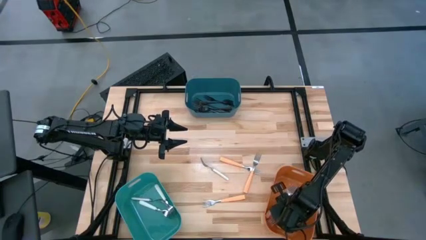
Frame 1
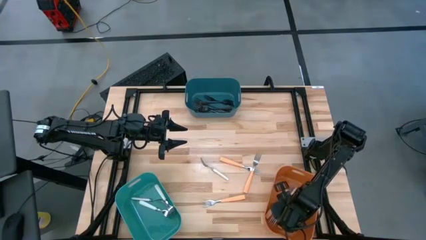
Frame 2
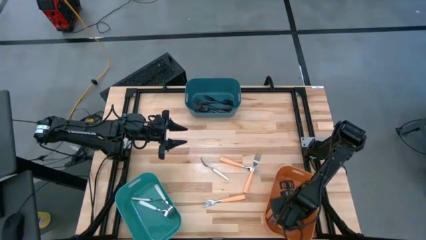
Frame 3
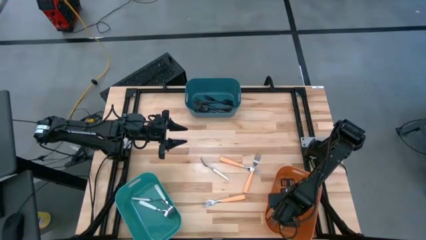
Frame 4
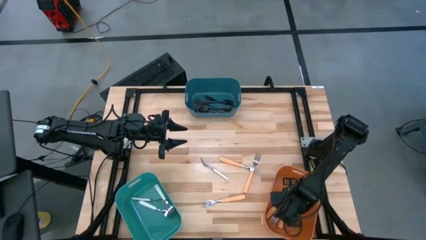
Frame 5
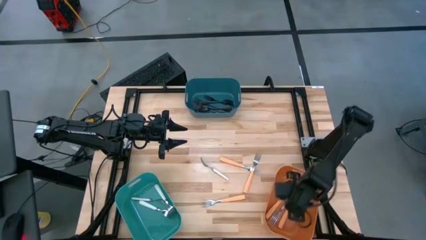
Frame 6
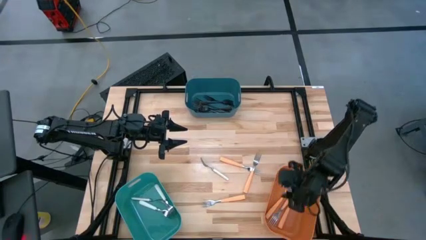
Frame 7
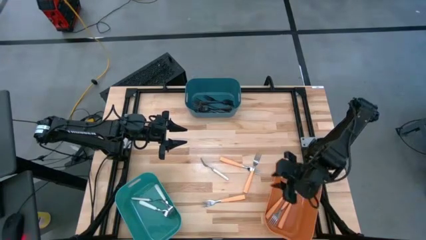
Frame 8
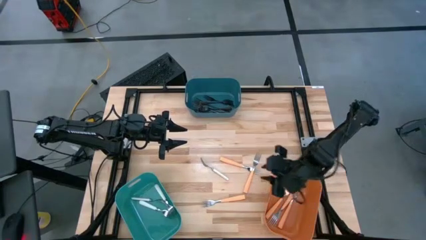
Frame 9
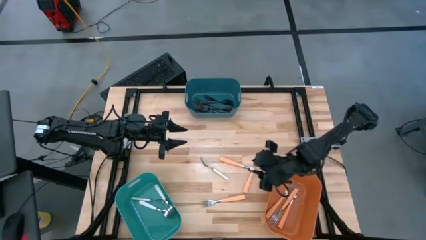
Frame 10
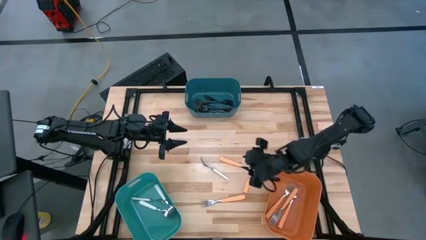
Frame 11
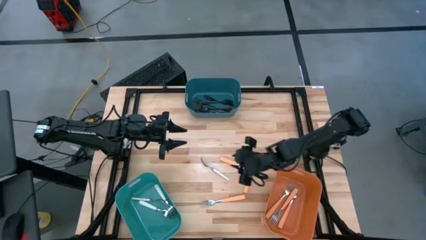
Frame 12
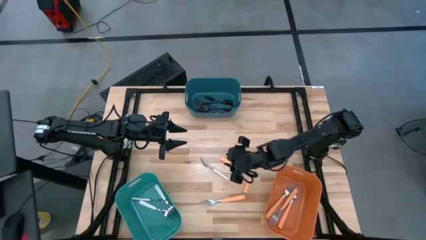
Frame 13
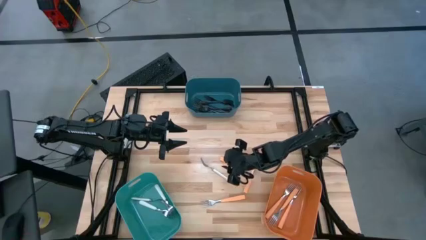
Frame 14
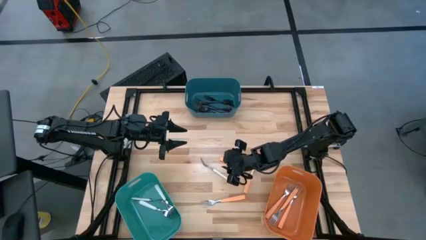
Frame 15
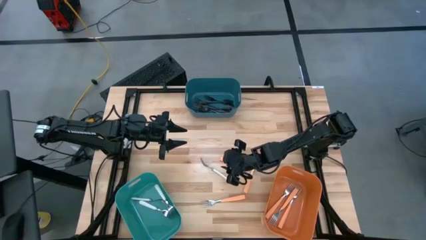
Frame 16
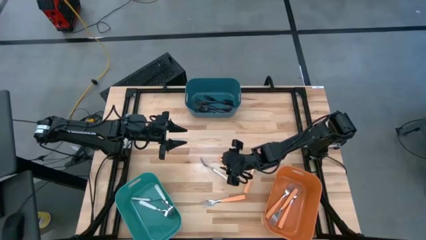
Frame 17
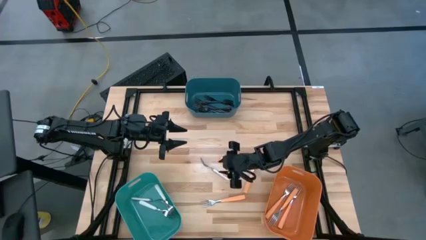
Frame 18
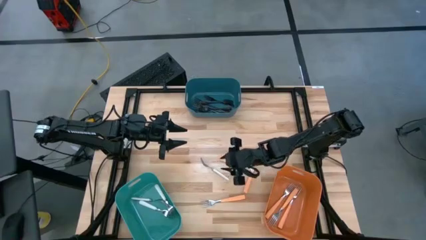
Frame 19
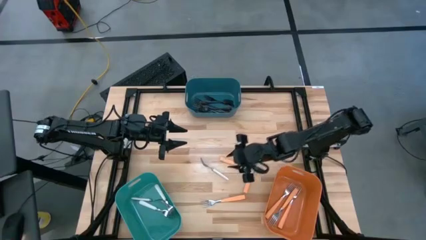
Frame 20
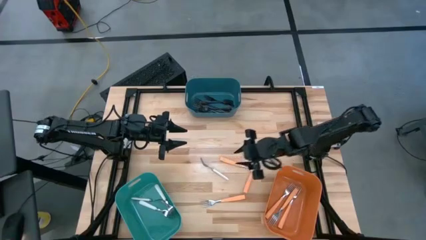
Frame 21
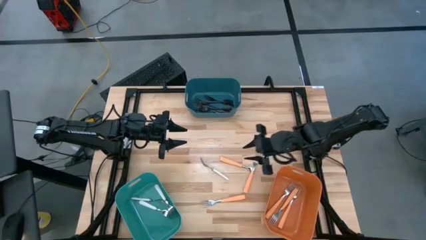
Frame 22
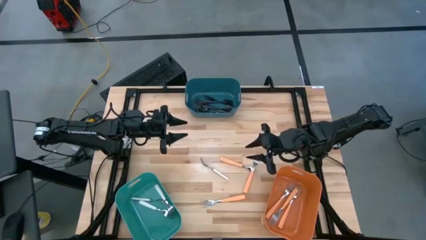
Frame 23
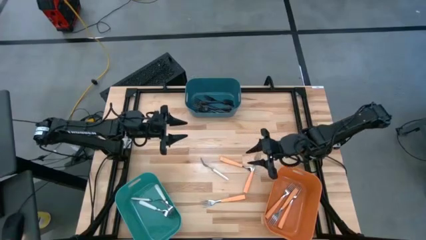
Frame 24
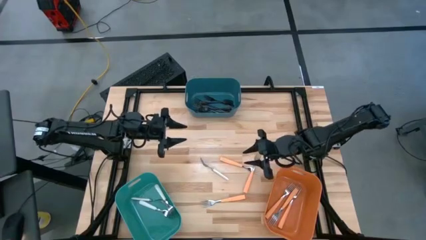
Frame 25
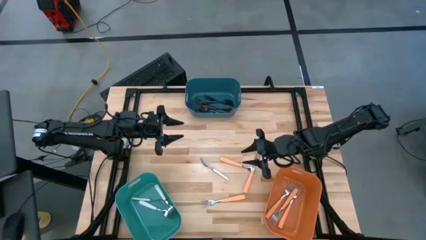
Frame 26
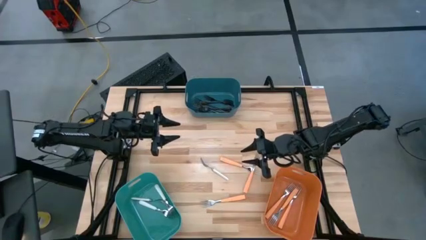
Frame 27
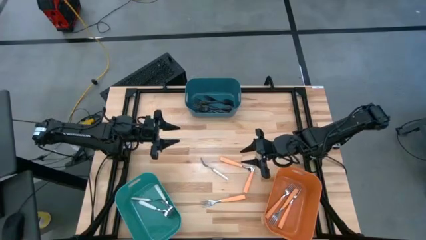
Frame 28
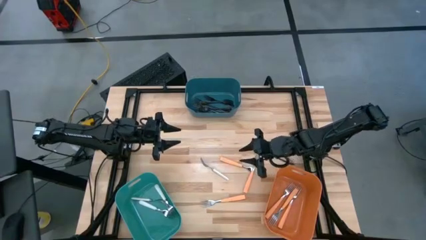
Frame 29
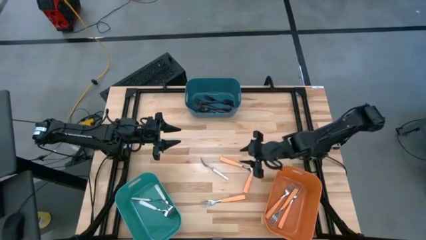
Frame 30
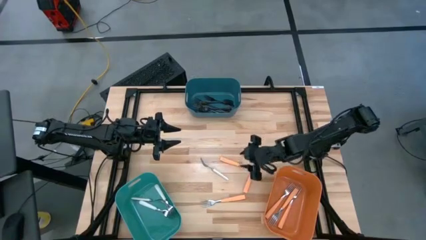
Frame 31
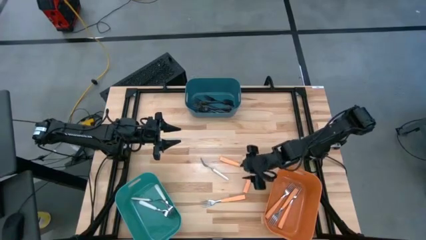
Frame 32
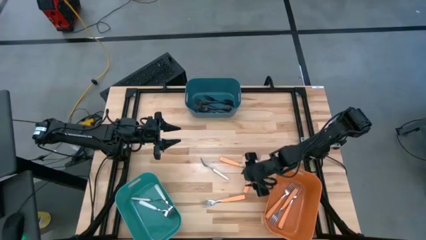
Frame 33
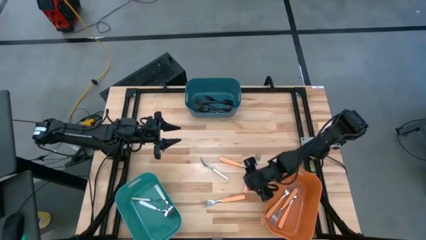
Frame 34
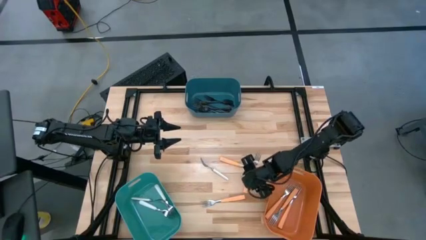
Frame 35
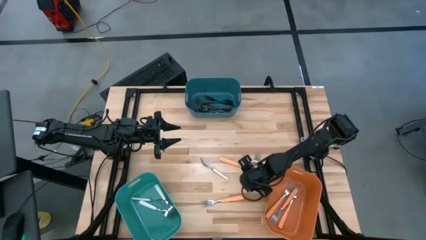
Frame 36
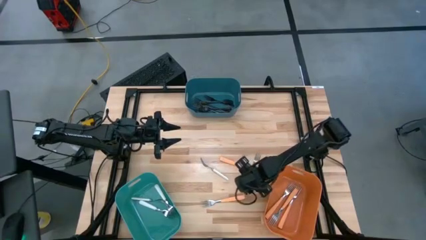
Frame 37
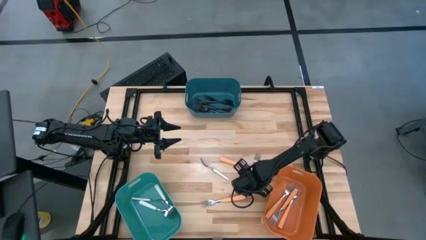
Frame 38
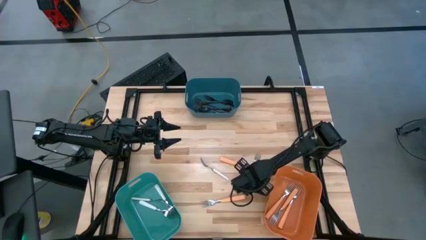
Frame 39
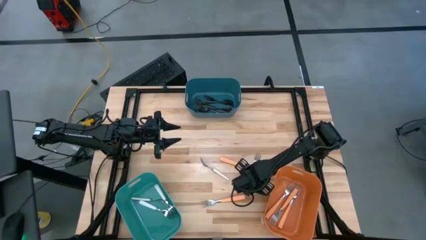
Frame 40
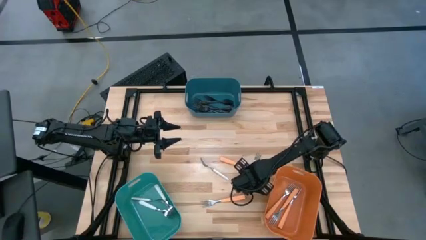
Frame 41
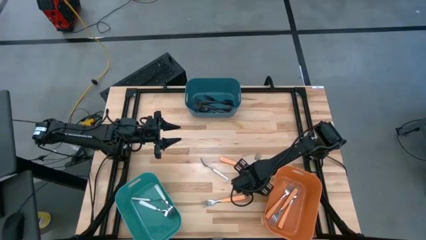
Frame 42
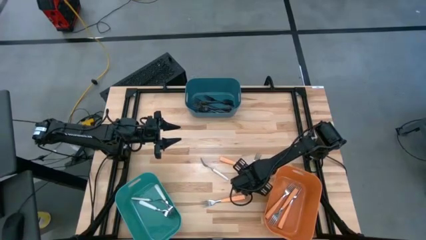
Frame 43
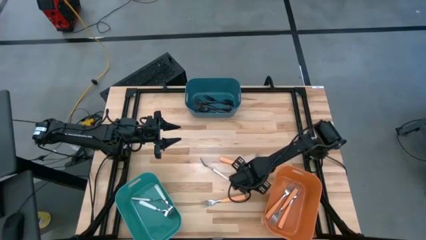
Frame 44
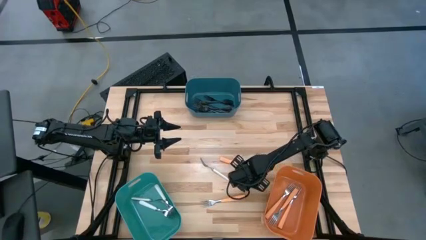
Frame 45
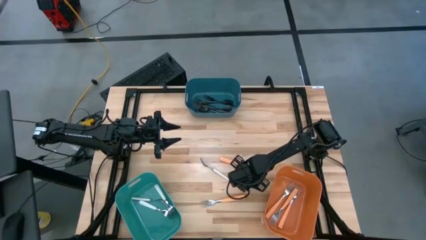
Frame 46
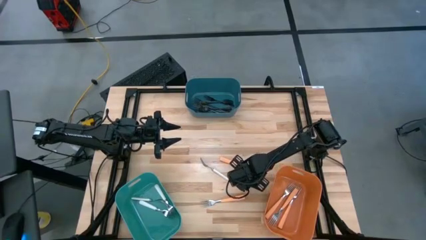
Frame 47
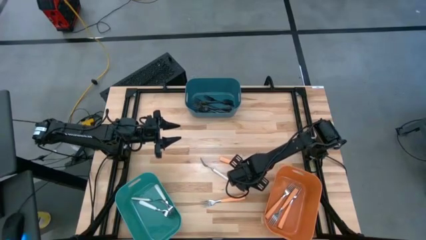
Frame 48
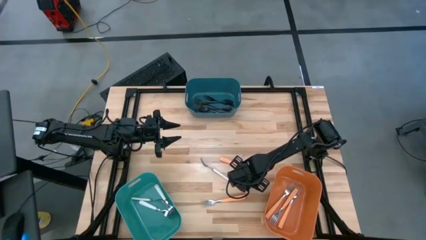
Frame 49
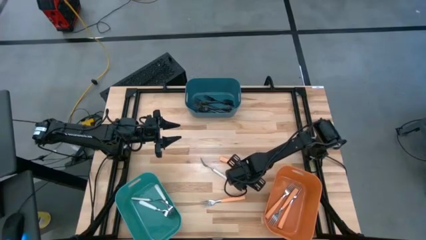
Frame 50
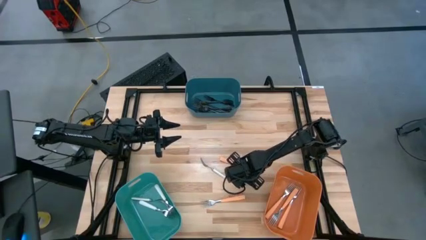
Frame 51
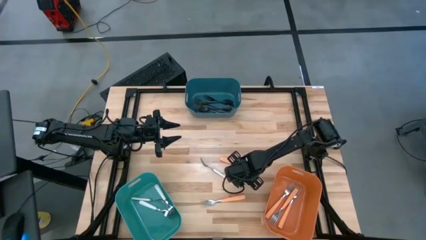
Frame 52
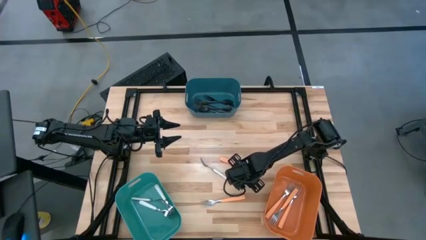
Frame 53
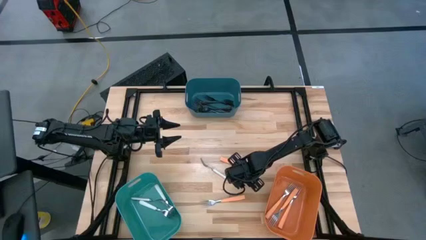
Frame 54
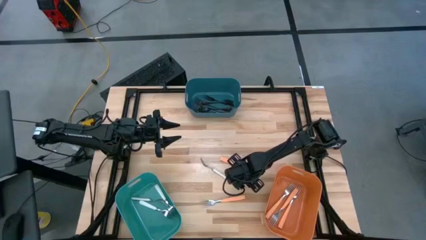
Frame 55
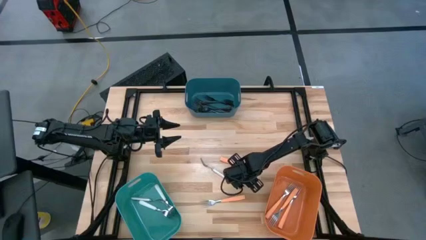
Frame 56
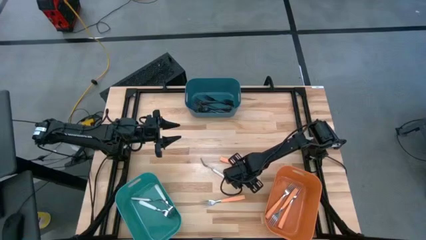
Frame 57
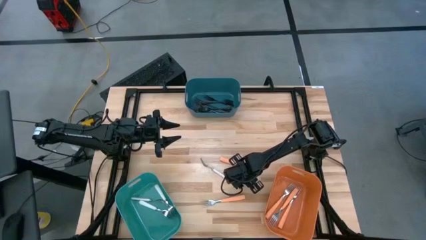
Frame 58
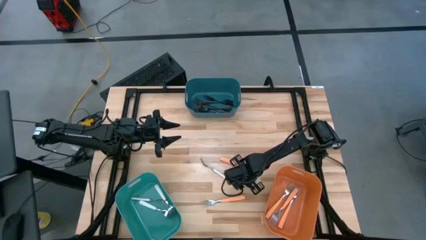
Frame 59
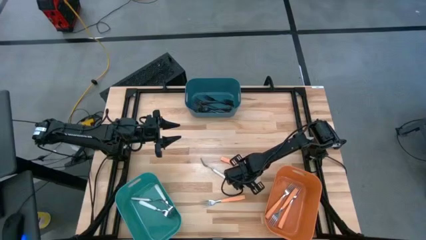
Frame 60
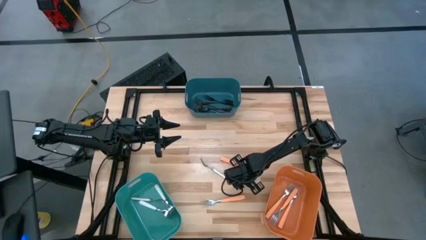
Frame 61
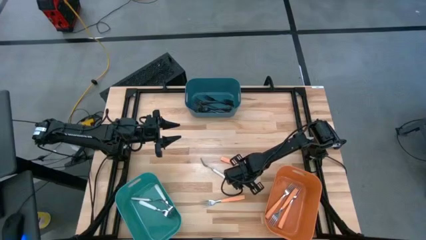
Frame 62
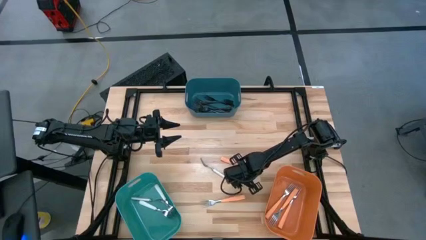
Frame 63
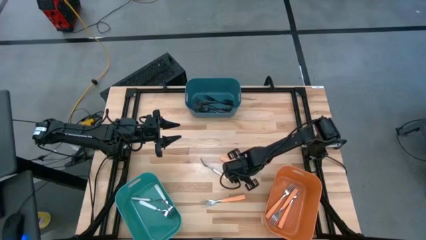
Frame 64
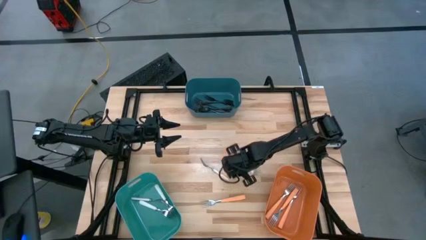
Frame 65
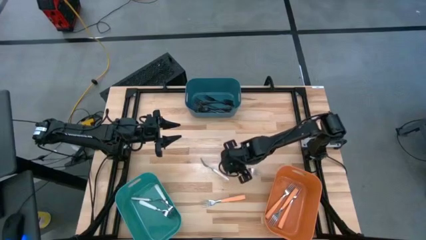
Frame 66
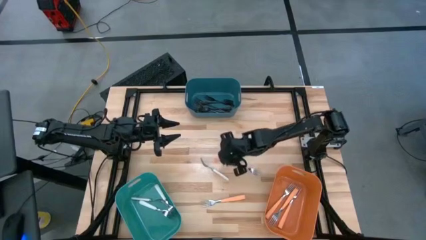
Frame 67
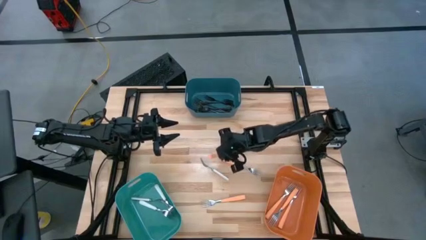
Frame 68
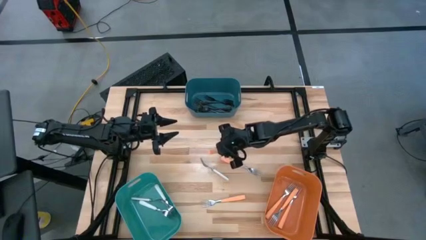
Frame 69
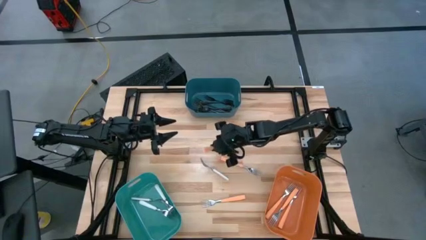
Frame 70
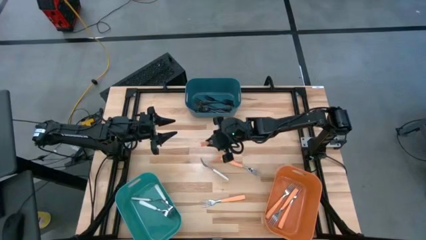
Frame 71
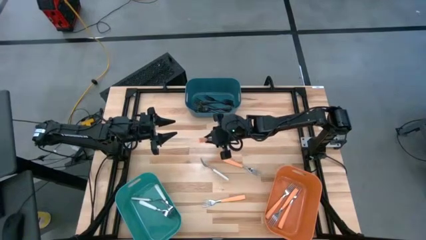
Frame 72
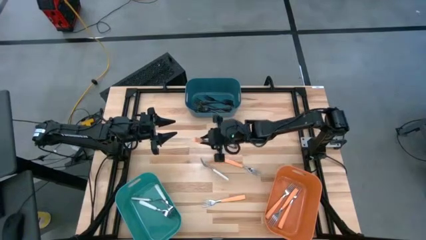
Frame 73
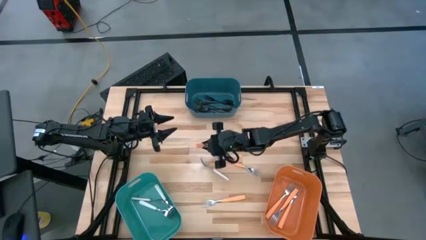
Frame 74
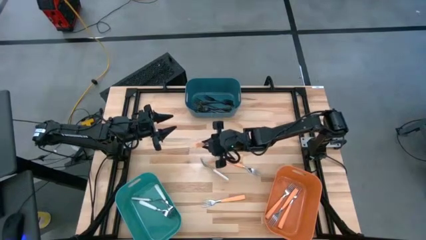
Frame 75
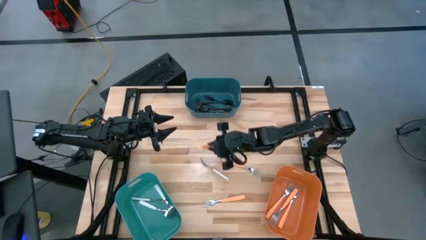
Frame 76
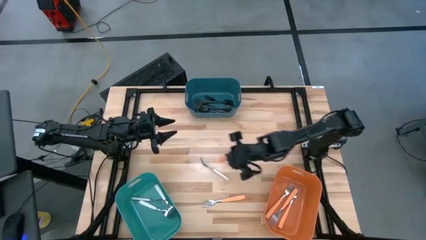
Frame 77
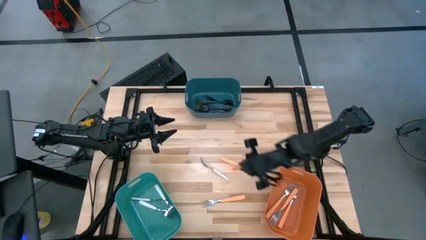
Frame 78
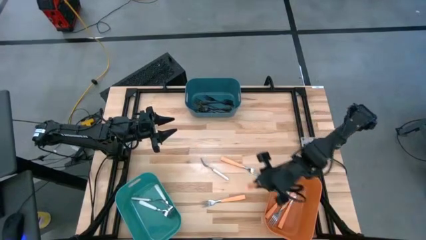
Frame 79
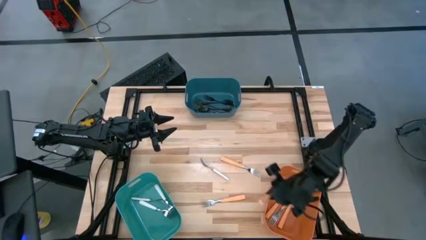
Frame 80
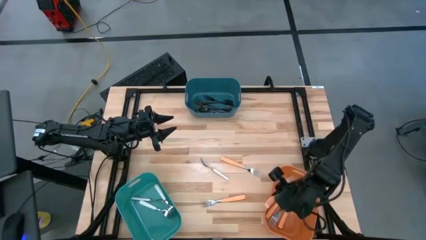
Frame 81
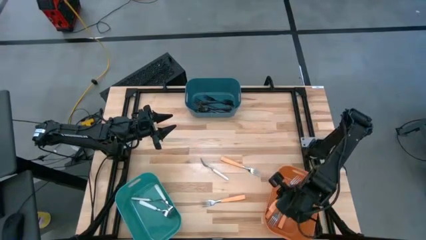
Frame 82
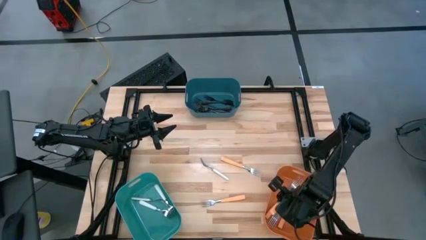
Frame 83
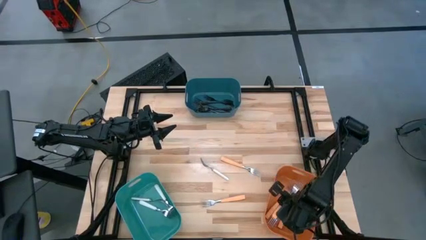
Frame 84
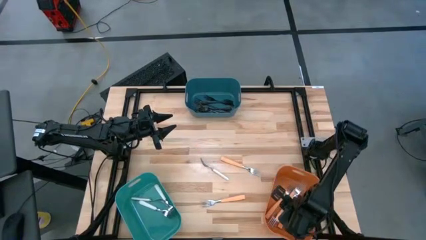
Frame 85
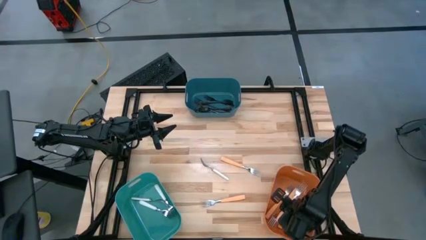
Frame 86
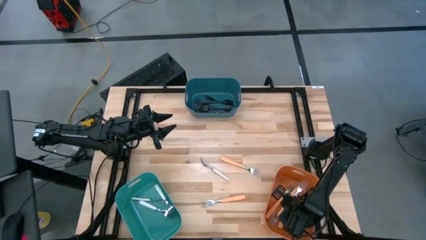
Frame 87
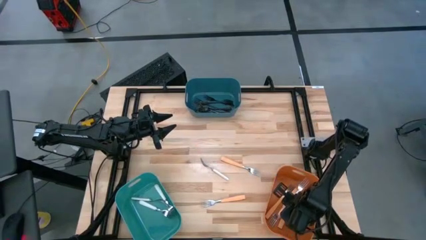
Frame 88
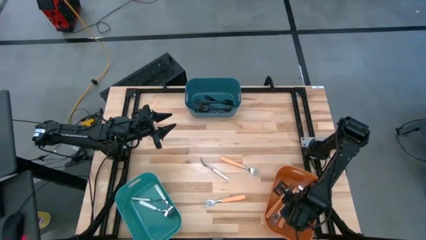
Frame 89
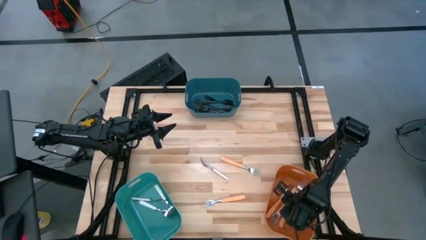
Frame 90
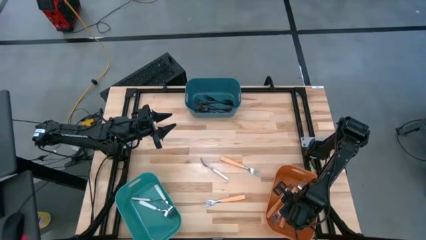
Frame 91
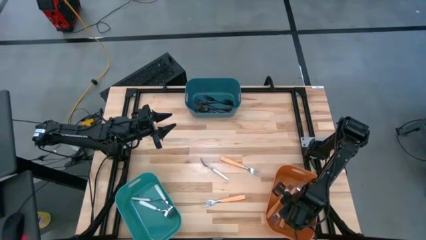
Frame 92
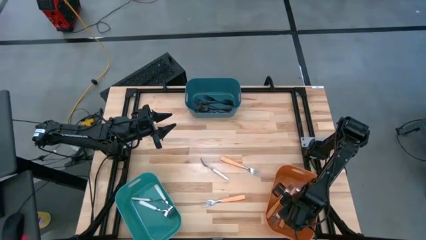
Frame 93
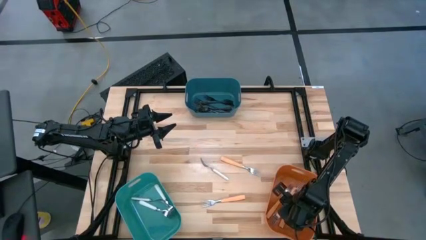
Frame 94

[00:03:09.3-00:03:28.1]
Task: Sort silverware by color (type)
Put the orange fork into the orange bin
